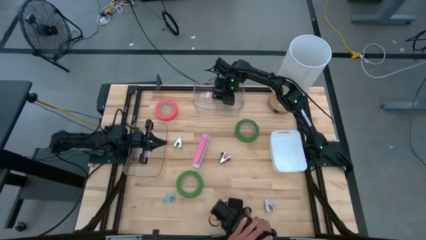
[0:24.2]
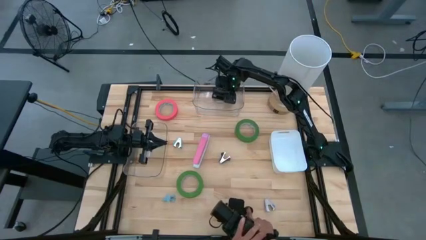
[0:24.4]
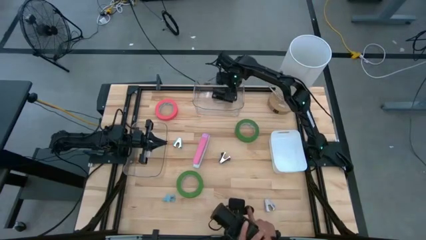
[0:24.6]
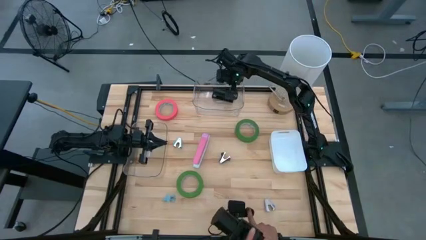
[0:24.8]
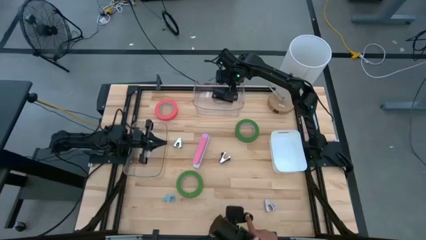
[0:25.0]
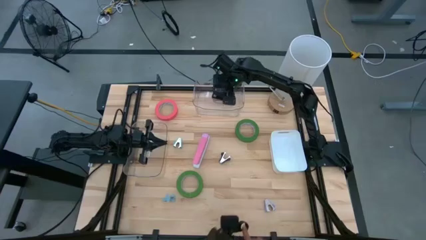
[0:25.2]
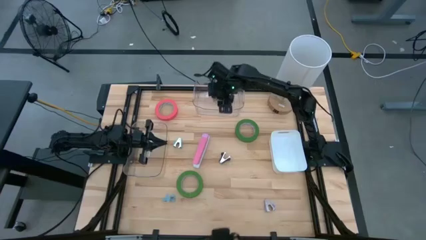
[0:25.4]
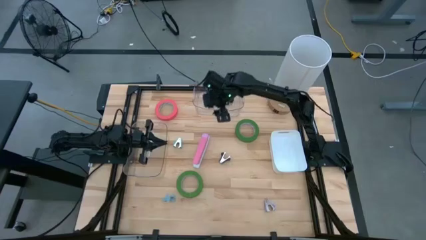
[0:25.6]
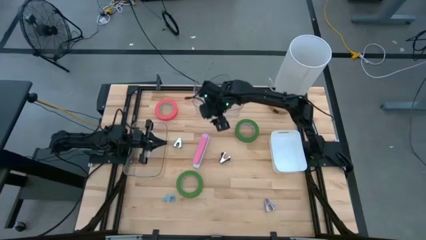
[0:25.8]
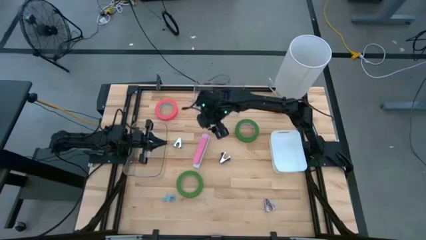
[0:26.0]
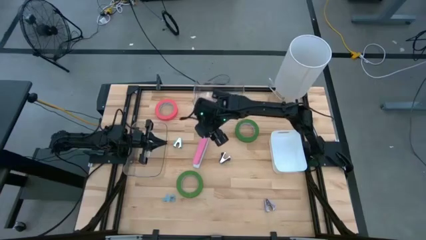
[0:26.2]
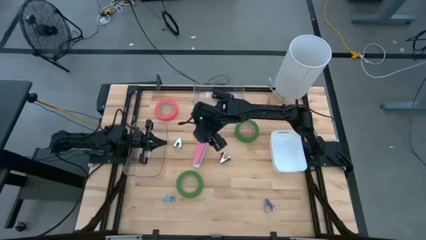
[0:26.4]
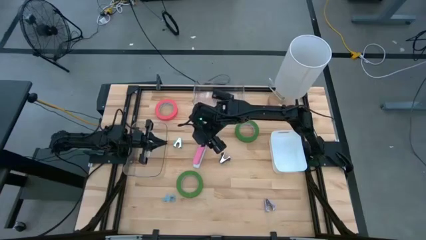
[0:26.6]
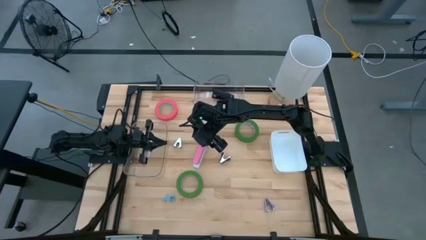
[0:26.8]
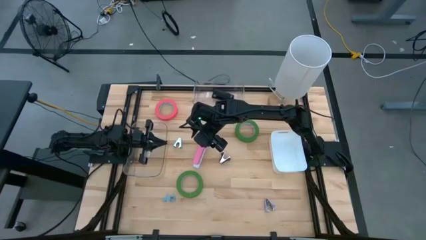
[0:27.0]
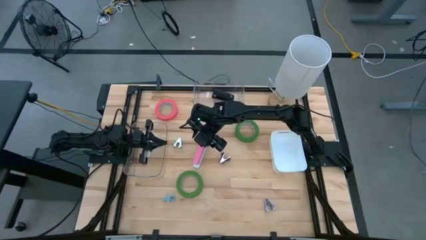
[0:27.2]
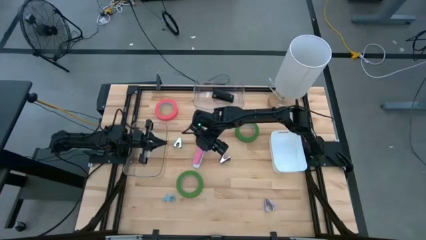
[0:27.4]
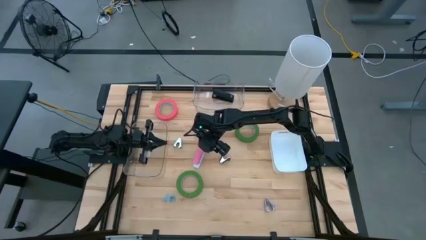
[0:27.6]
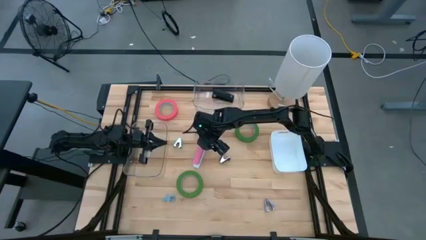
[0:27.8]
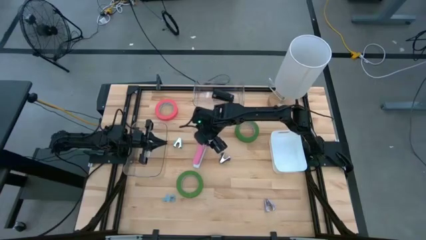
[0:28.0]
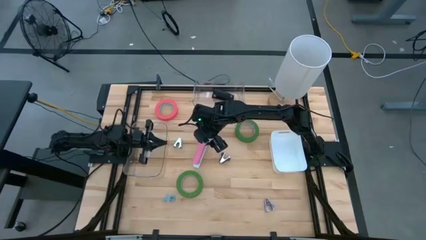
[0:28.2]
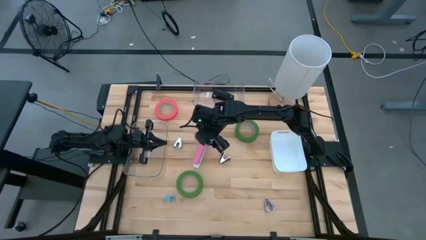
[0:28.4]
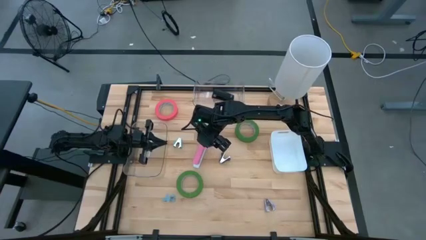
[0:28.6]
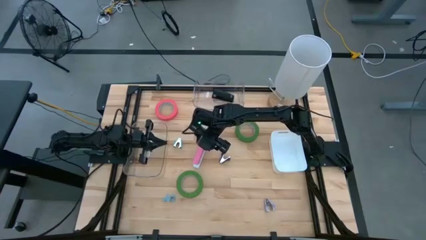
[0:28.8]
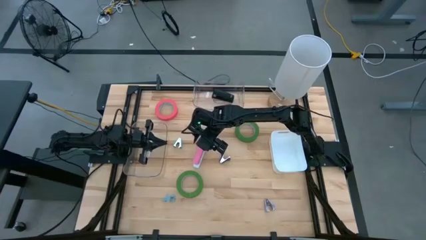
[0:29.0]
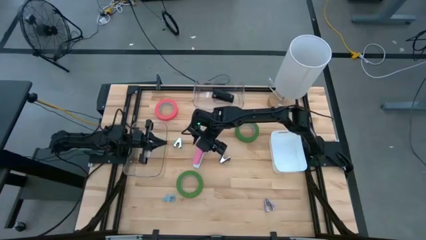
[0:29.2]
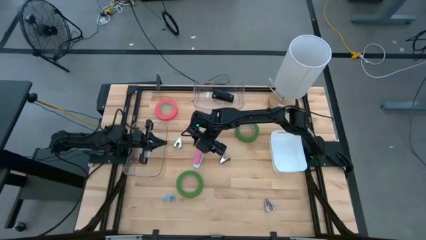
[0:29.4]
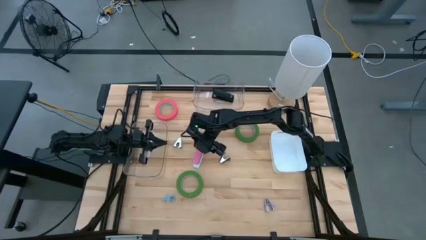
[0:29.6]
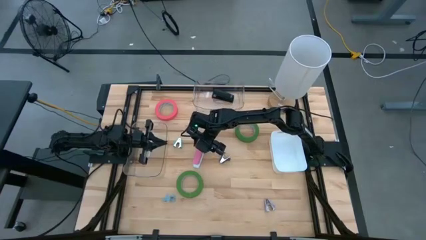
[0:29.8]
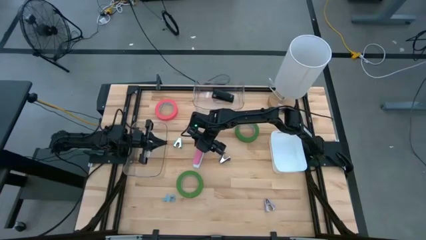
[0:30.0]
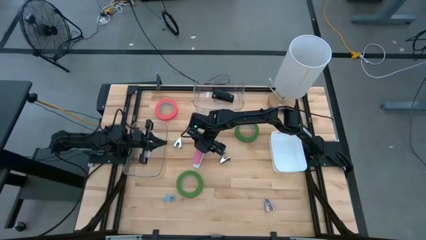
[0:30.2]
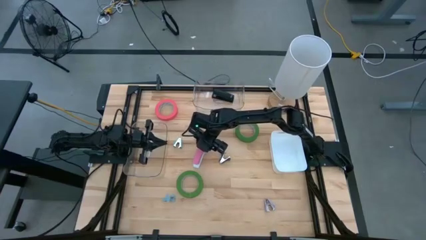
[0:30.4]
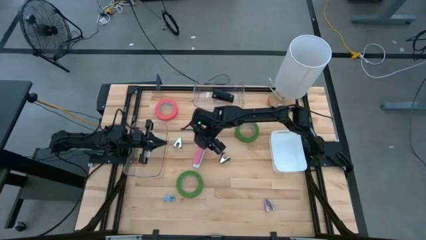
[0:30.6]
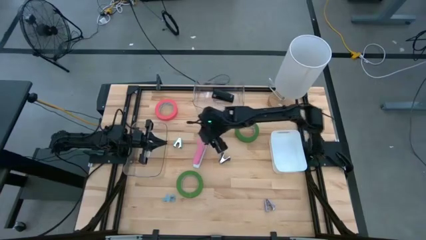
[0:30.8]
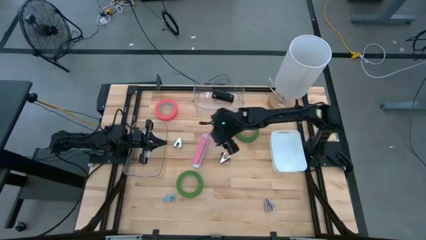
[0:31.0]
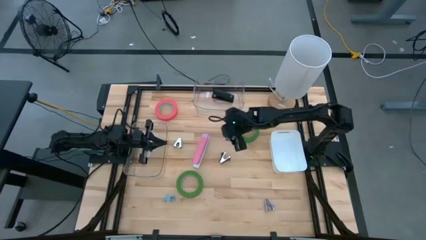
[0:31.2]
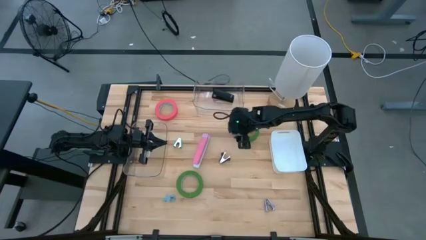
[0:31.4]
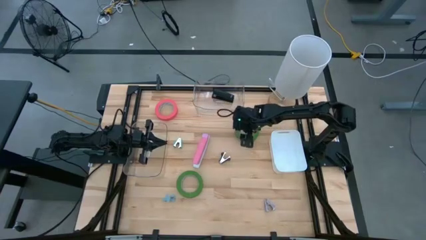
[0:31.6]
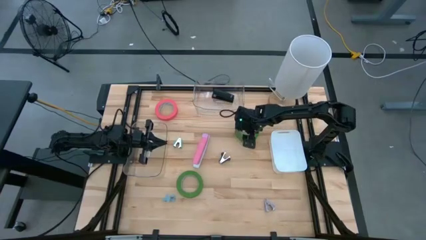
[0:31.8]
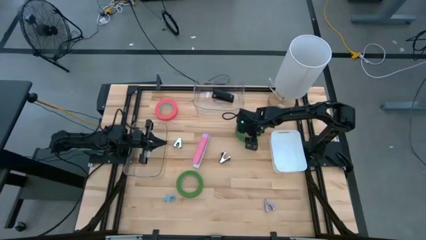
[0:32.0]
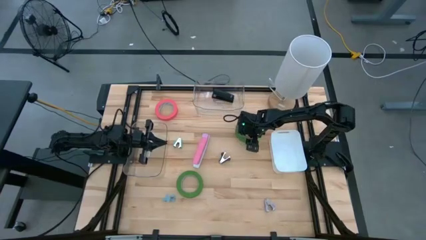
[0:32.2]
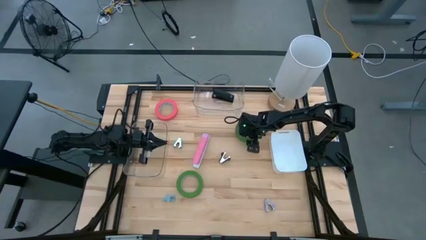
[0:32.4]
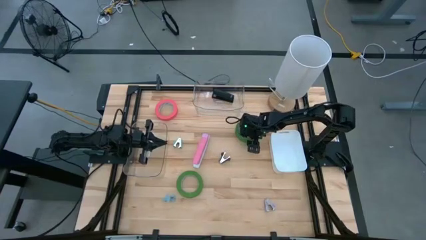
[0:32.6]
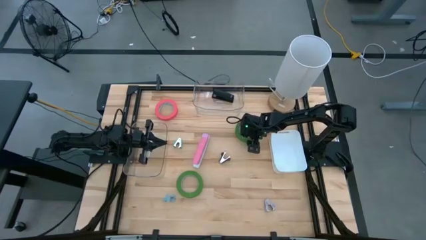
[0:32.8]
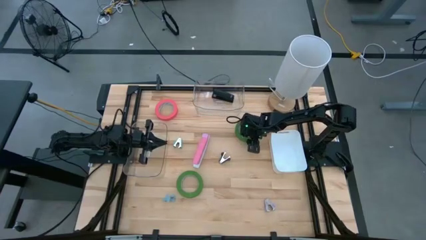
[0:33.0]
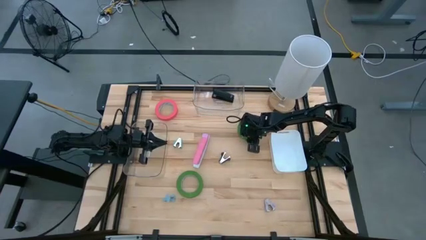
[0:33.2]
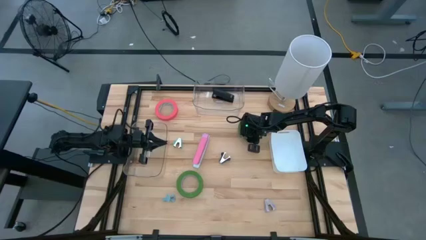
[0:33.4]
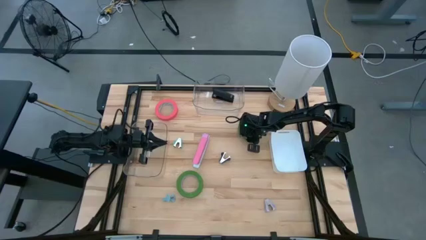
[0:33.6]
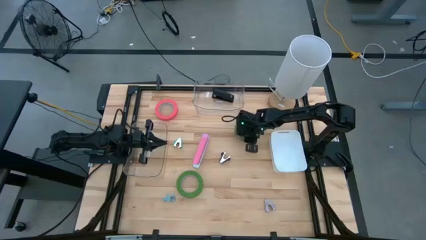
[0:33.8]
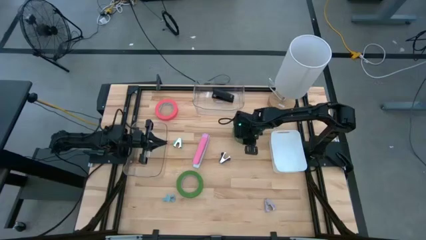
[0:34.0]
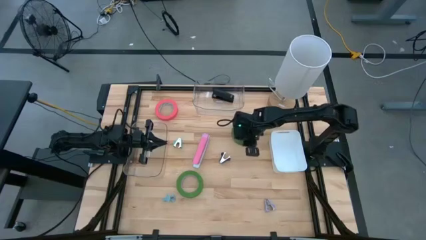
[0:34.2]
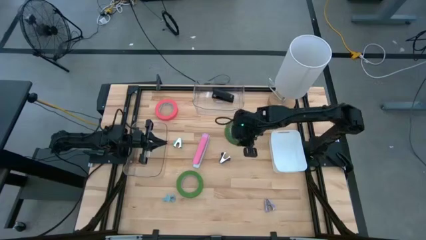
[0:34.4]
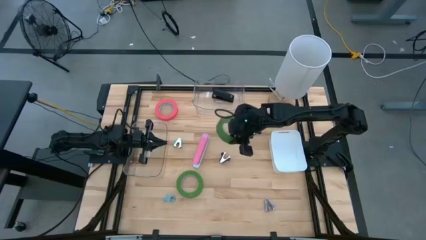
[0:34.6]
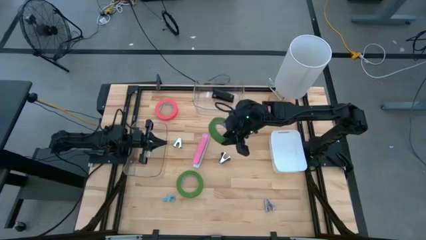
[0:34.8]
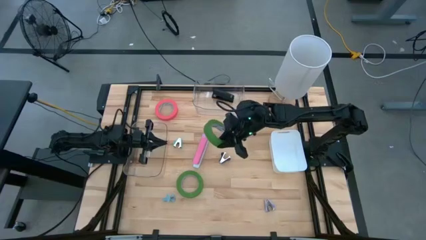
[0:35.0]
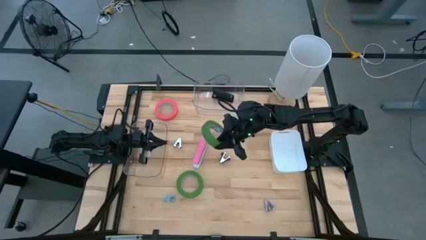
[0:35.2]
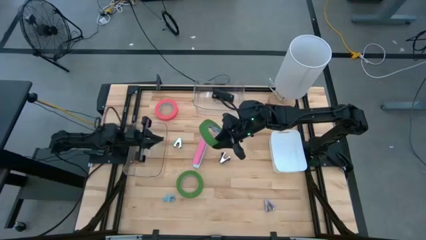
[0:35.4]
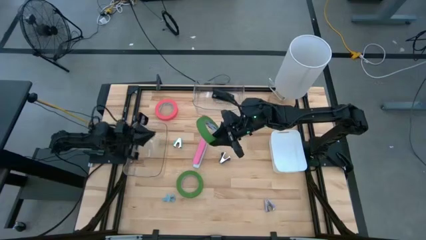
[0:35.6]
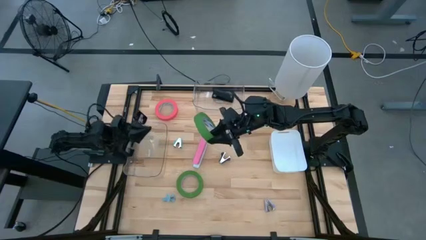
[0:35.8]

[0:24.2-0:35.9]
Task: Pick and place Stapler, Stapler remover, tape
Put the top green tape into the bottom transparent bin

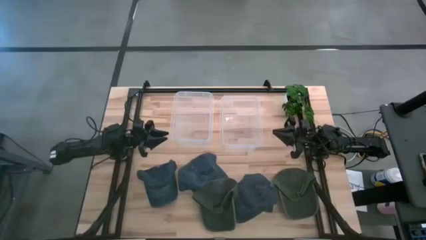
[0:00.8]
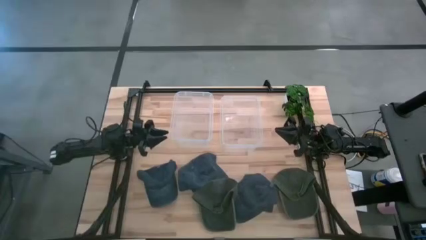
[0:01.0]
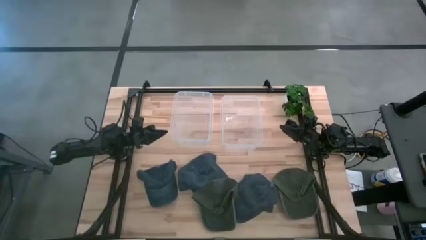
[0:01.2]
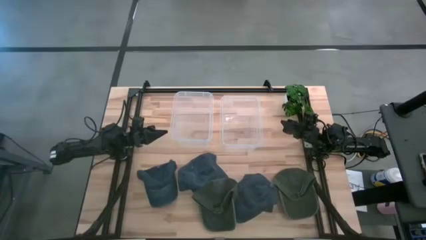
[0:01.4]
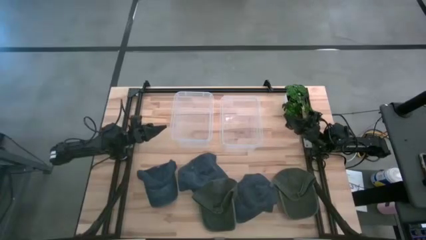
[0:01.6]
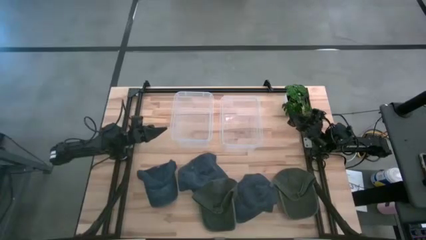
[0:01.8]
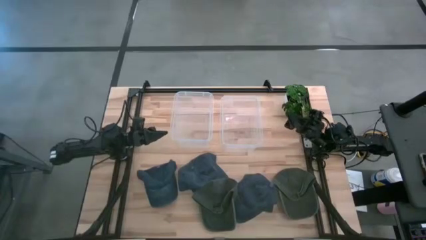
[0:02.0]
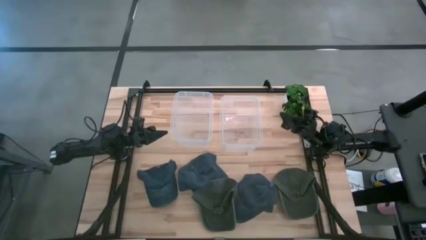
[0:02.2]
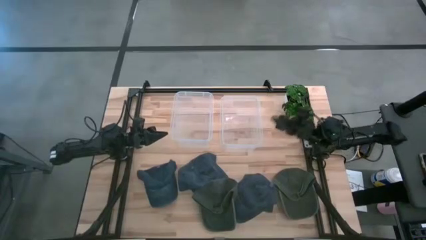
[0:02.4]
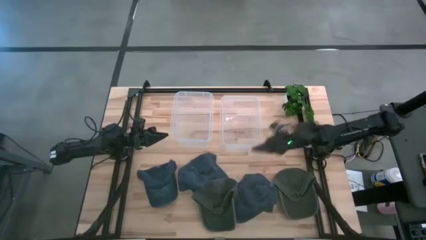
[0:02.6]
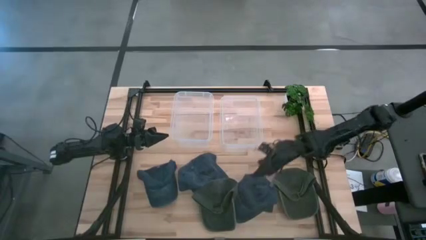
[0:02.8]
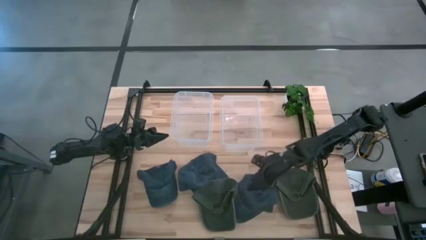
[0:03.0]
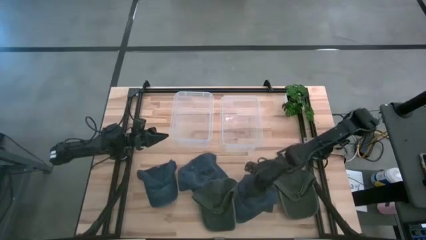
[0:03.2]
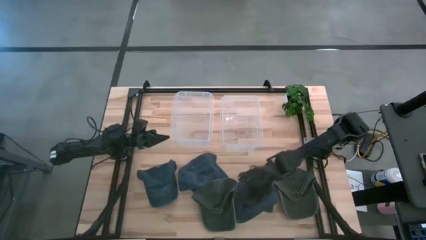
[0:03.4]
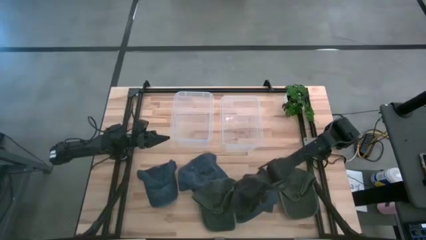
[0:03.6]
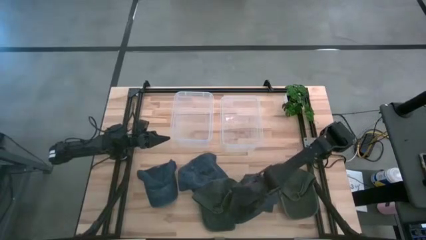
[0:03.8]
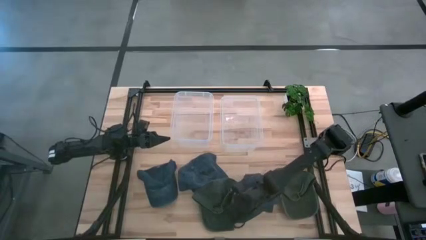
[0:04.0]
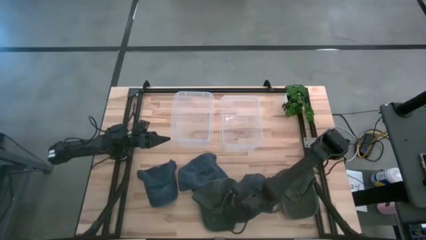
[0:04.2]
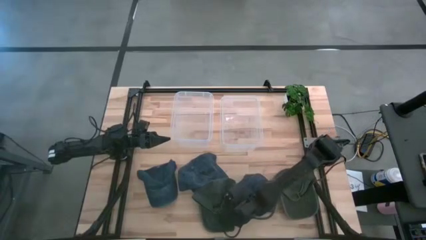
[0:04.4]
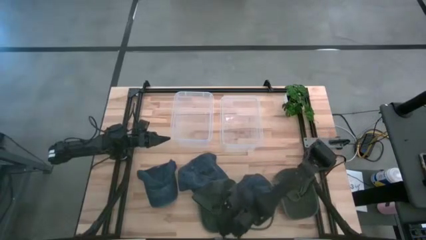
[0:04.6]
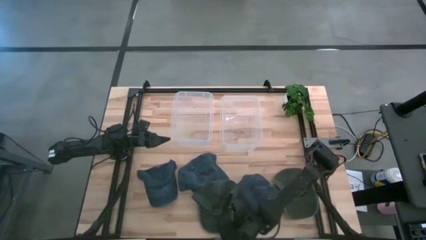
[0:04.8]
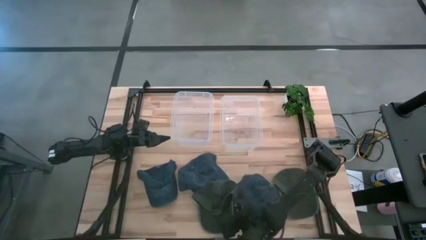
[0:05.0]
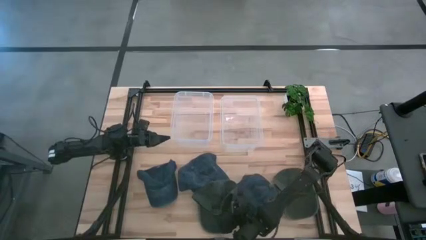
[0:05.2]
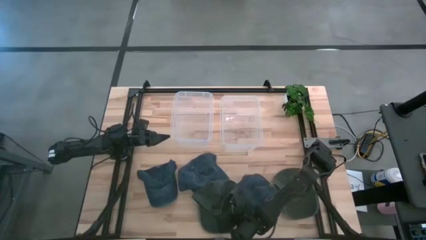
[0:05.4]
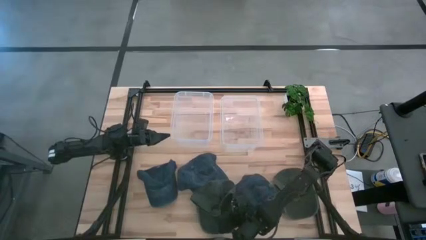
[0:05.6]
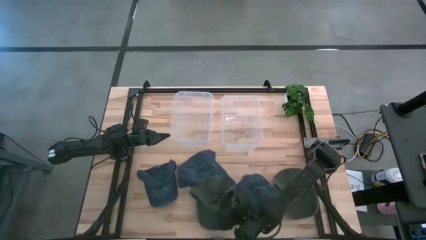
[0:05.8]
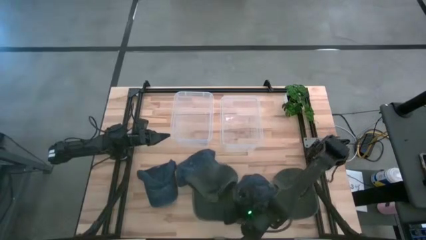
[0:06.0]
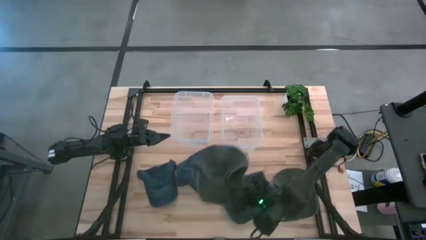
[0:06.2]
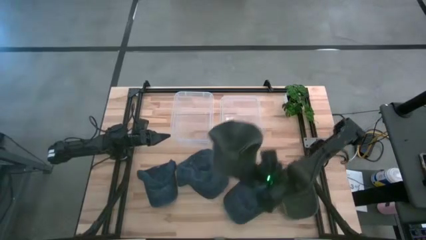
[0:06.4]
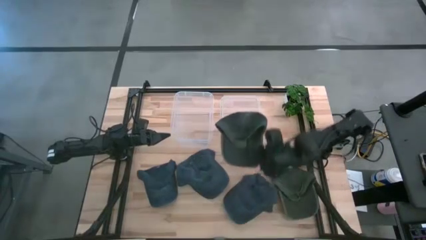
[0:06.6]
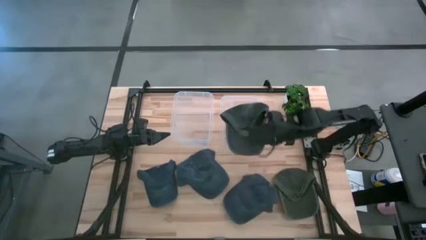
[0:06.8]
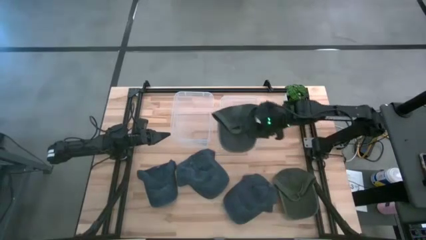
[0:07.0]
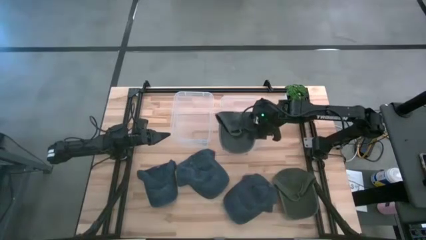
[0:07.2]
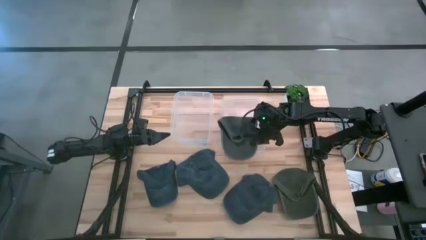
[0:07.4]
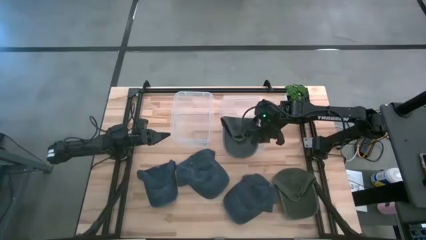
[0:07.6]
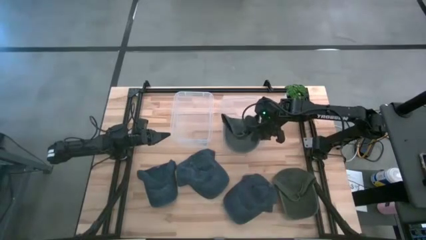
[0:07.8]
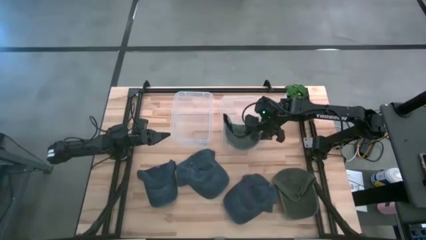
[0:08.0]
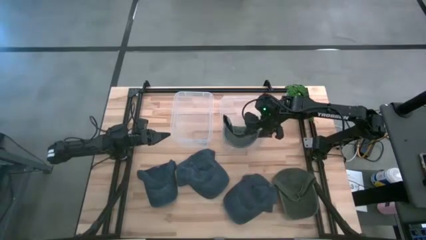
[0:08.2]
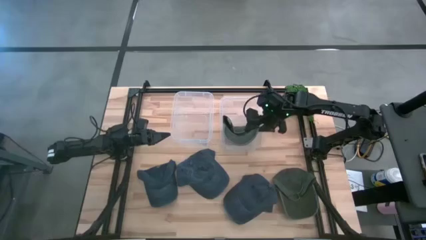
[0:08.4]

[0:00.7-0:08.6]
Task: Pick & Place hat
Put the left green cap into the right transparent bin
